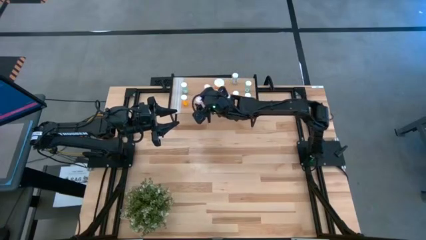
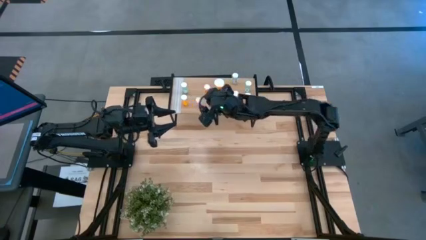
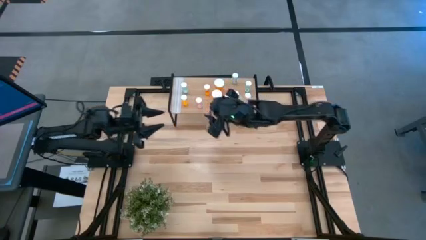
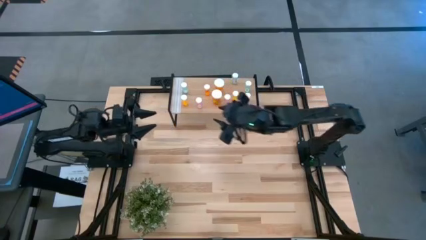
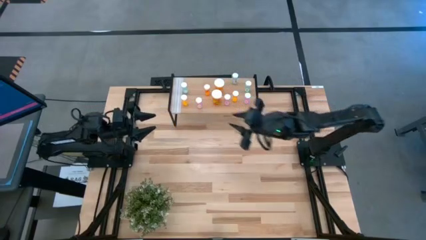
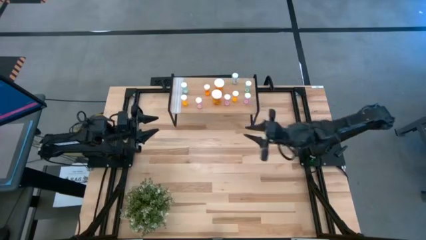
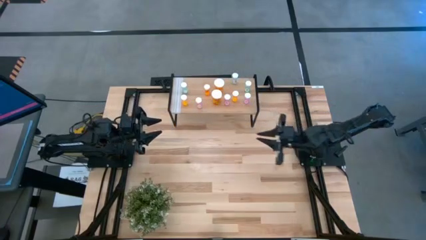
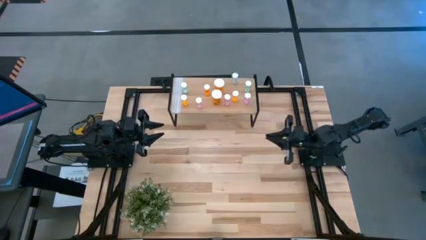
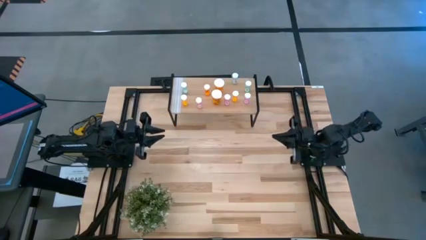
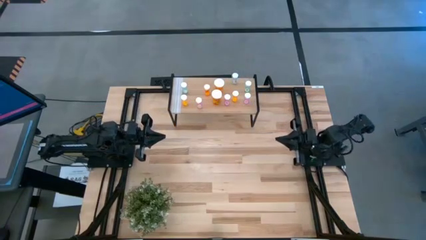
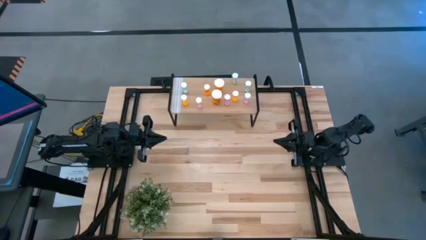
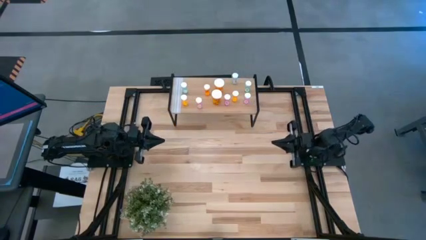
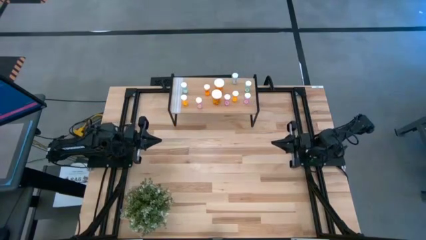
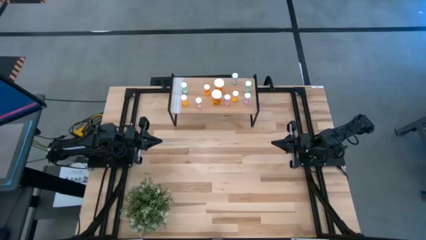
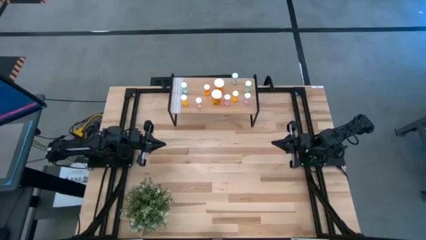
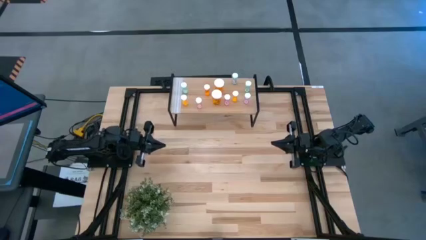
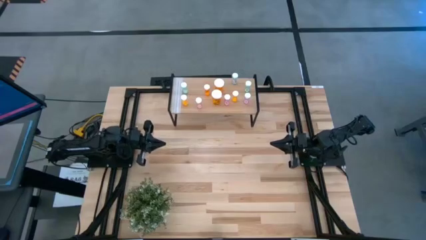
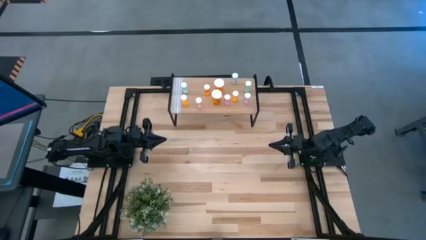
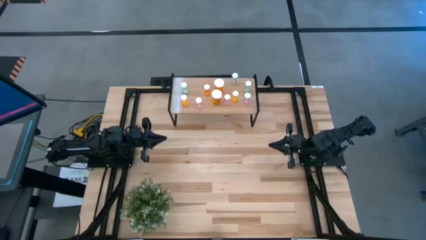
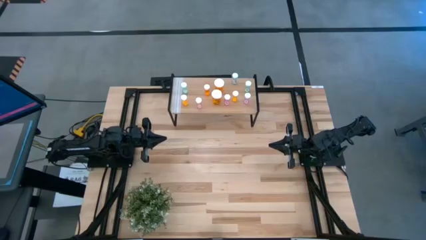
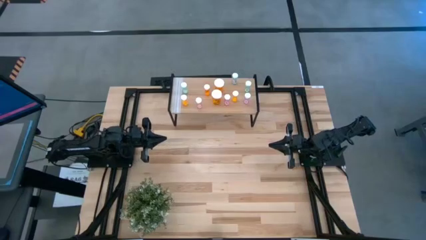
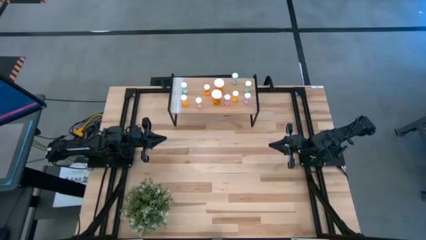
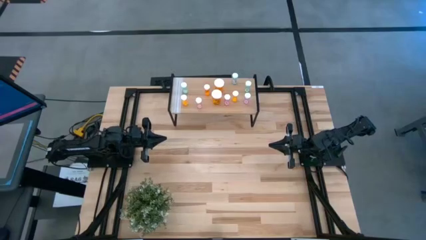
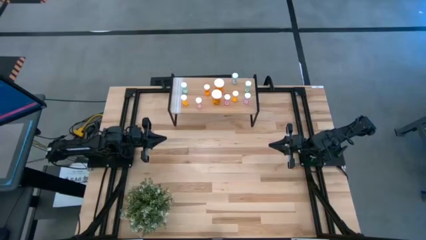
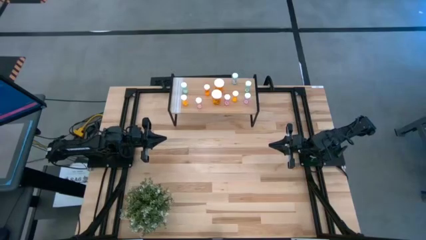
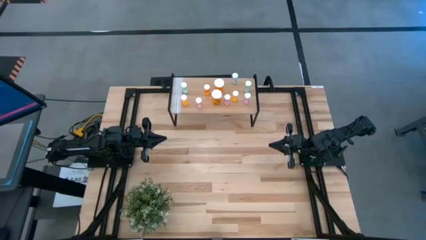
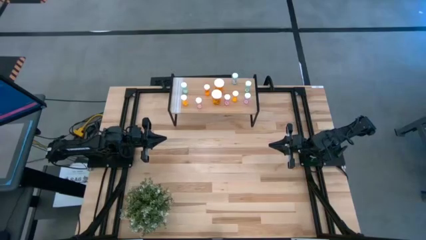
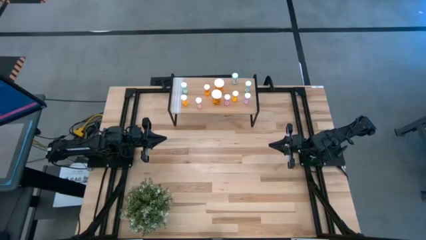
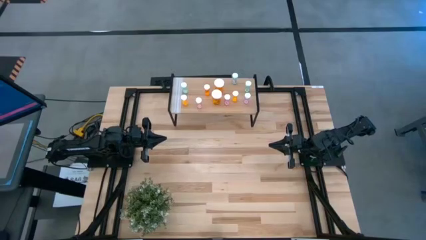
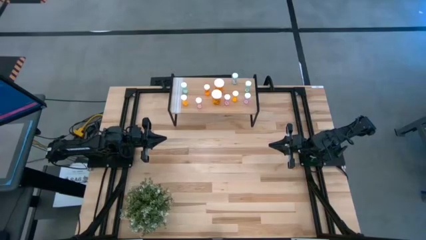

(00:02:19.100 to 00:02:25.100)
Task: Pick and place medicine bottles onto shelf by color
Return to Home Position

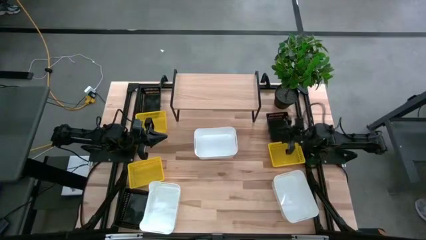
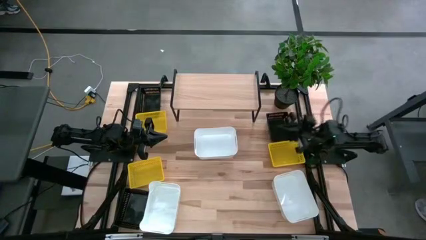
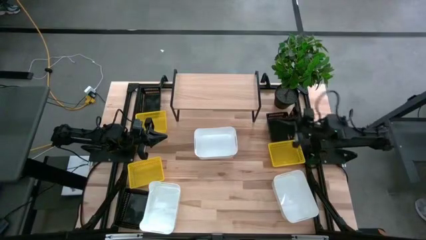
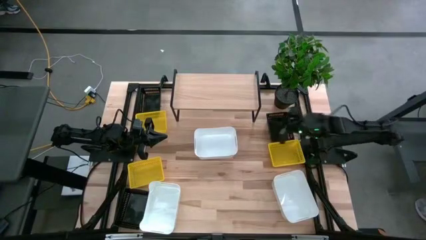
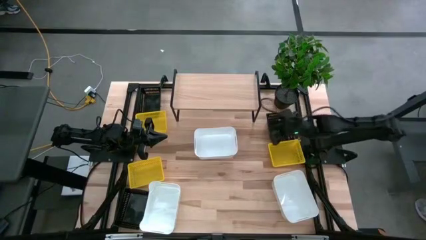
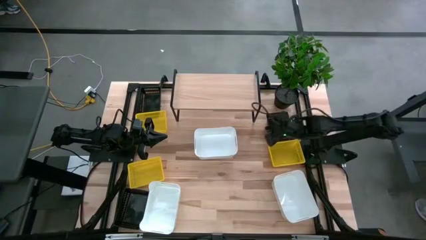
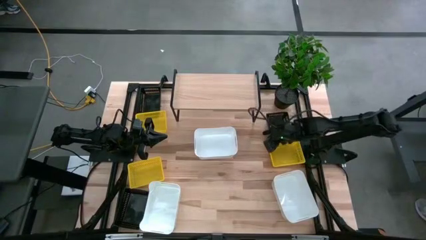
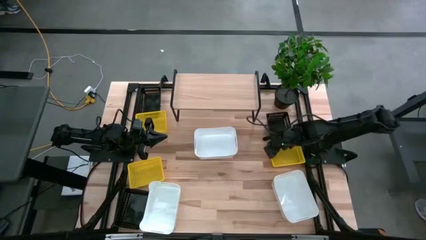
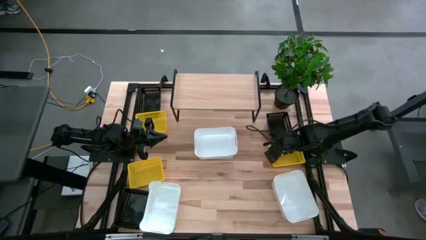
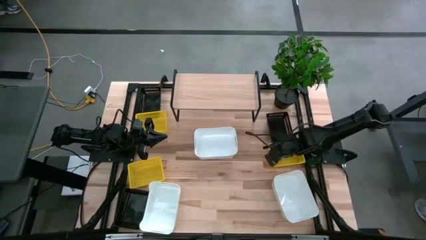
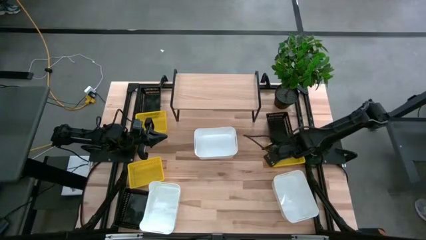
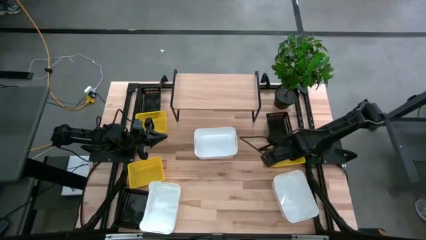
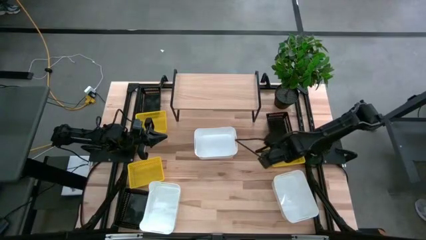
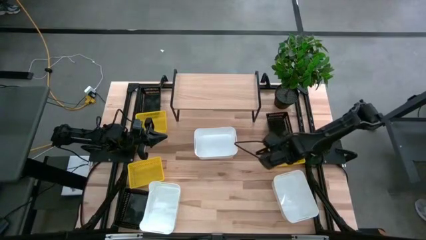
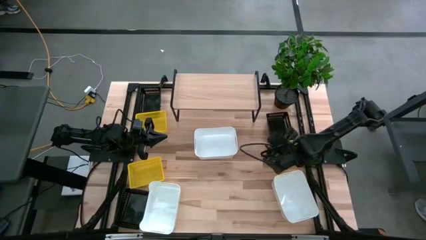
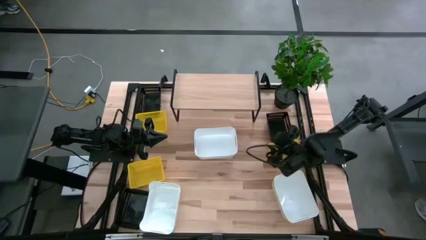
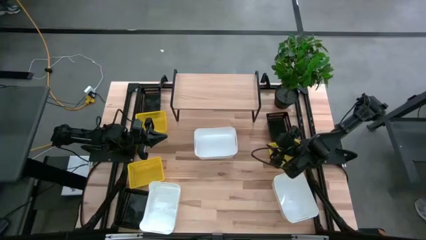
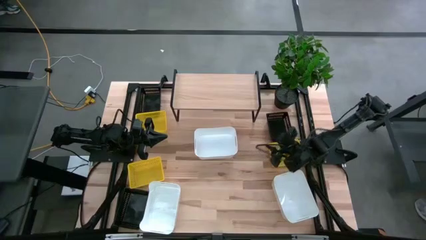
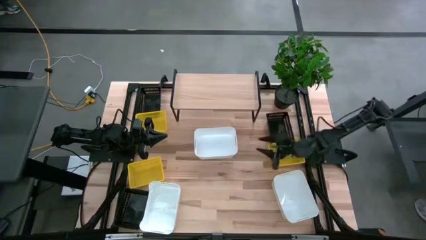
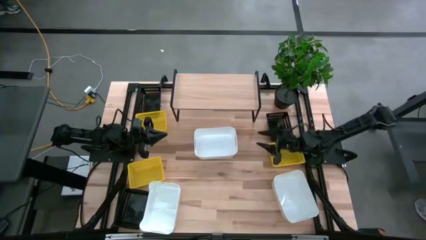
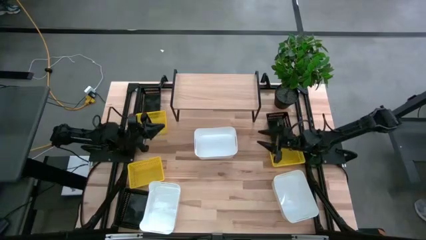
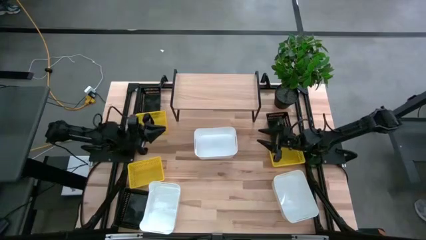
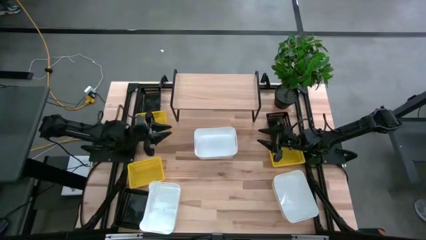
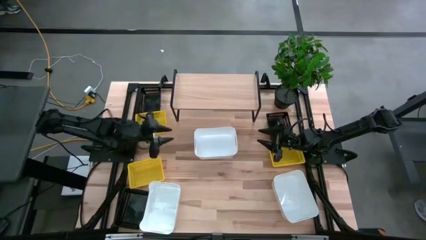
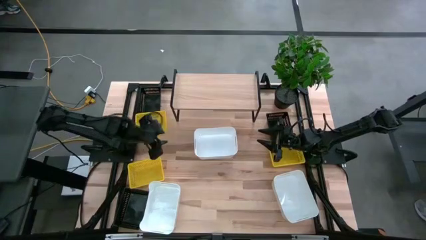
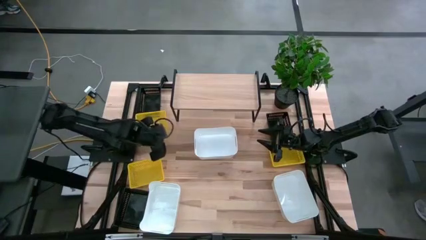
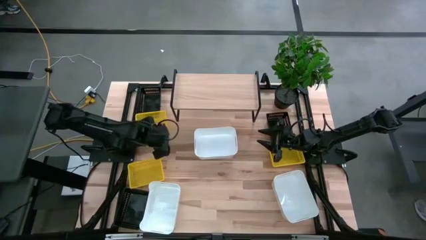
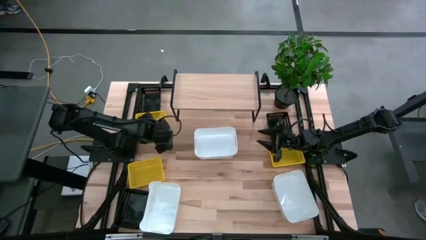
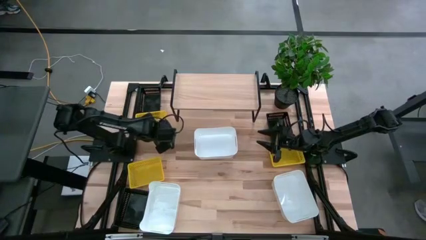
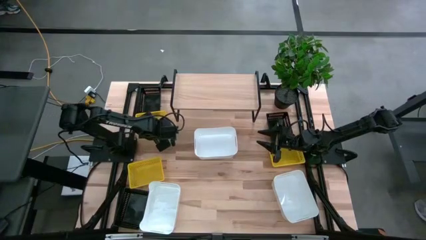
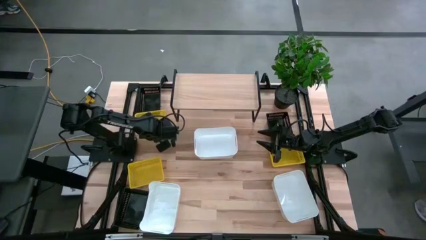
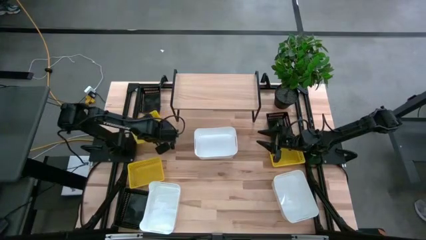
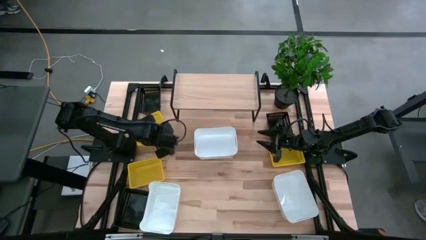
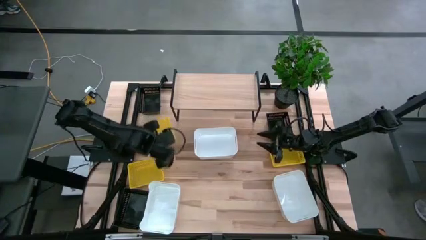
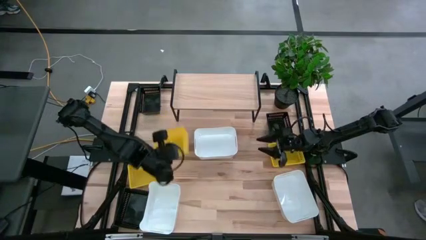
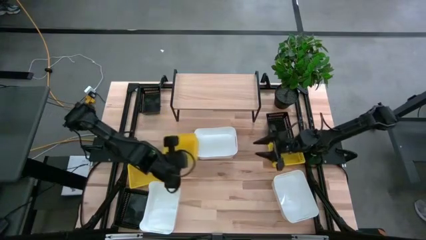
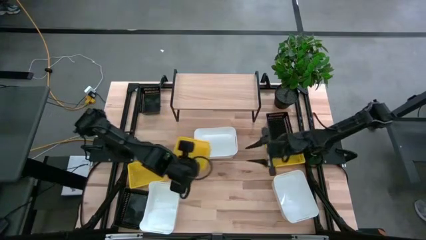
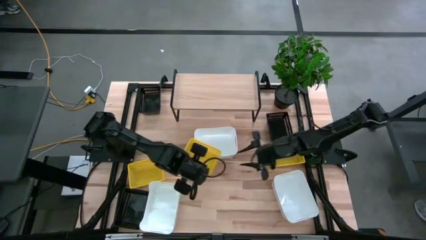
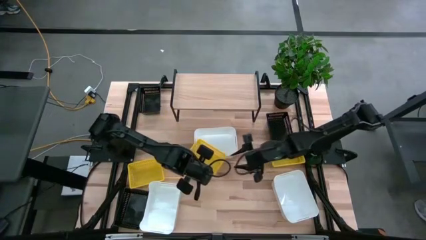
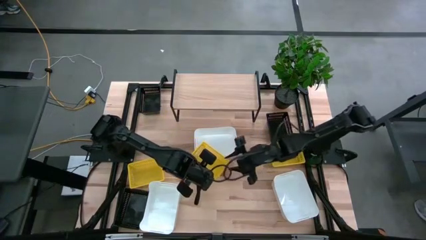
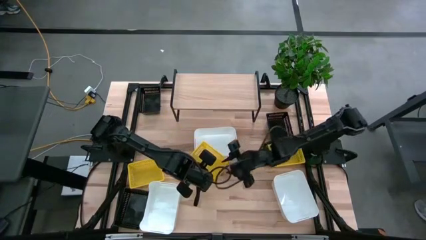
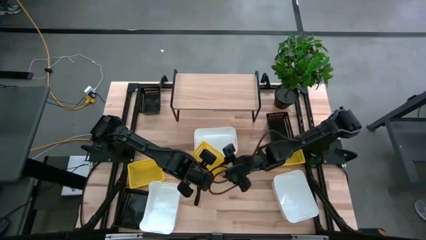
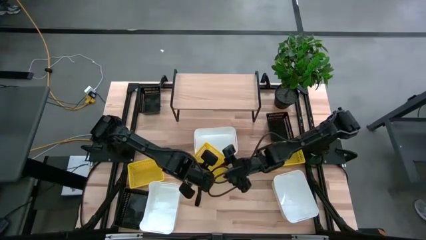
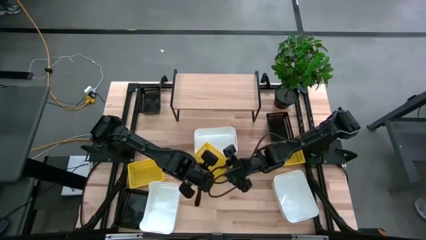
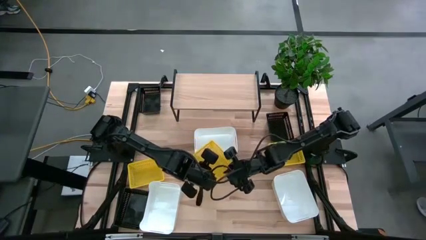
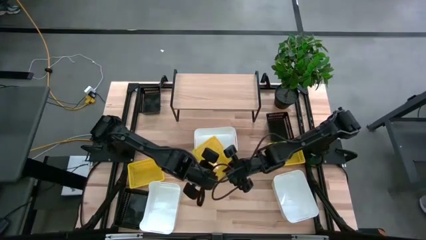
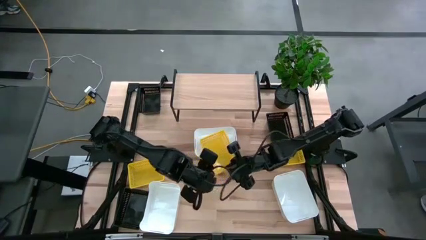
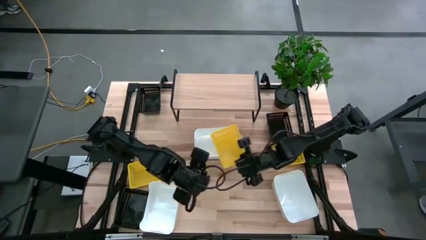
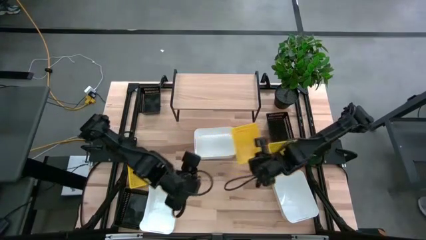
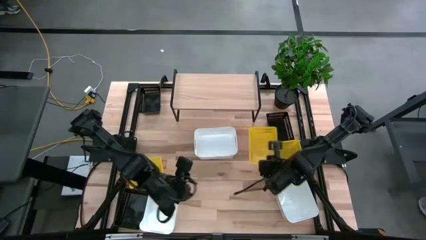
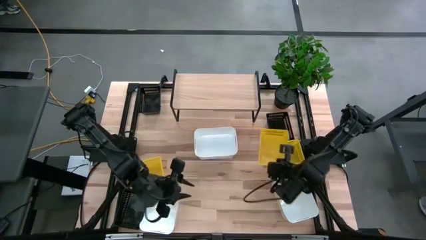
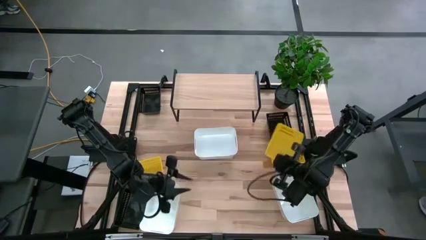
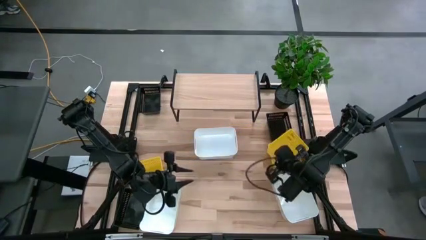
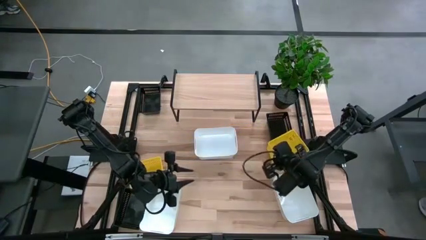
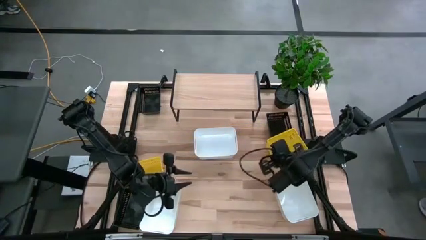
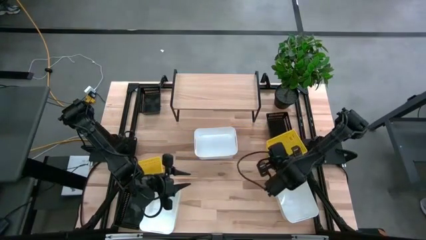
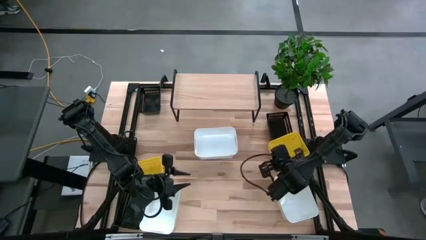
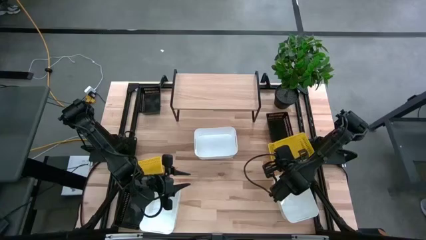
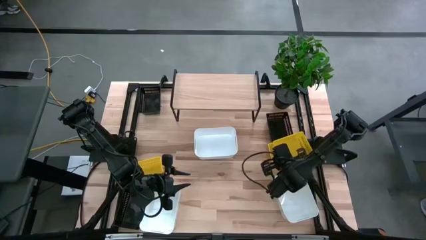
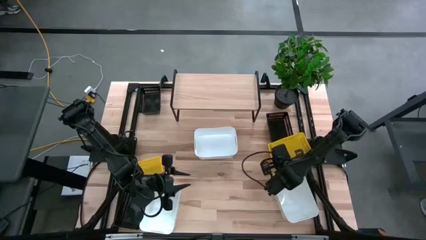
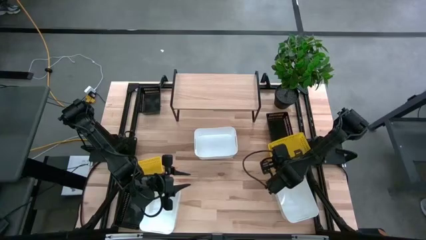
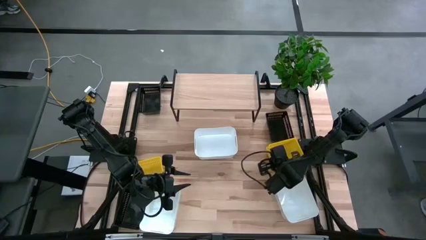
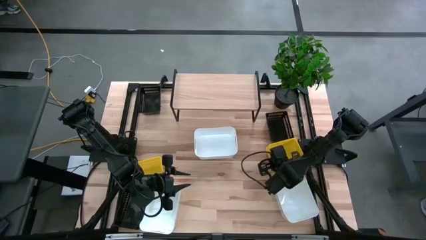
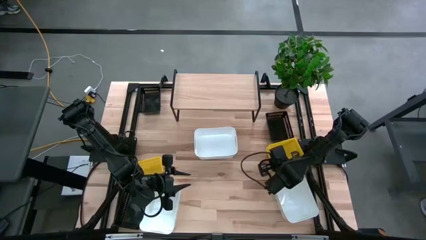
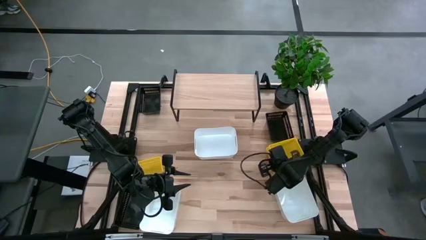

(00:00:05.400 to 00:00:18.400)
Task: Stack baskets on shelf by color
Stack the top left yellow bin on top of the bottom right yellow bin
